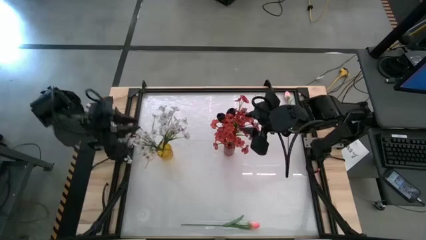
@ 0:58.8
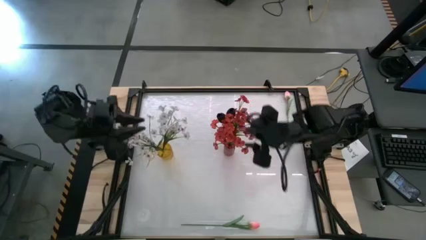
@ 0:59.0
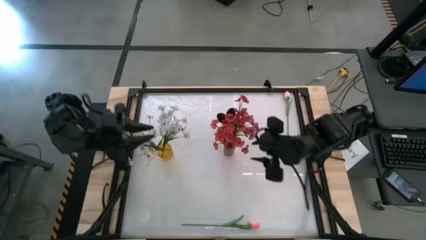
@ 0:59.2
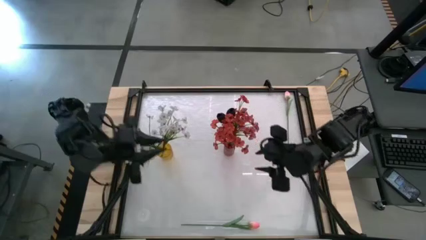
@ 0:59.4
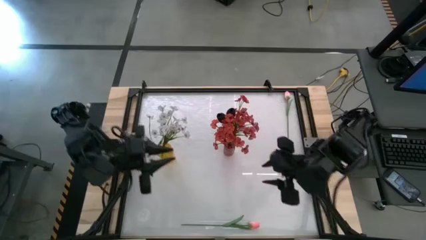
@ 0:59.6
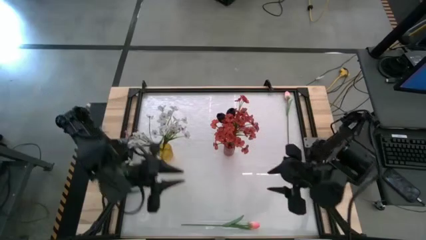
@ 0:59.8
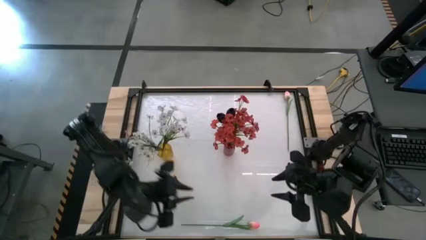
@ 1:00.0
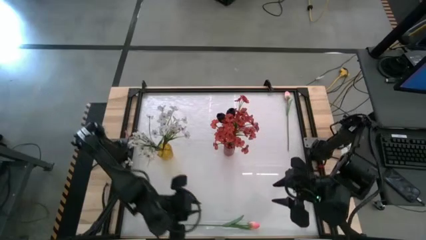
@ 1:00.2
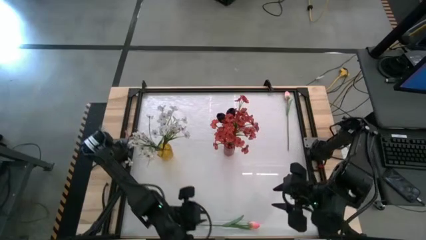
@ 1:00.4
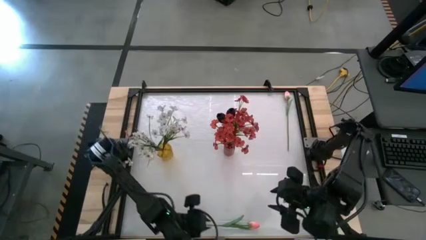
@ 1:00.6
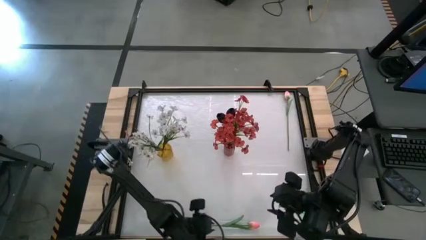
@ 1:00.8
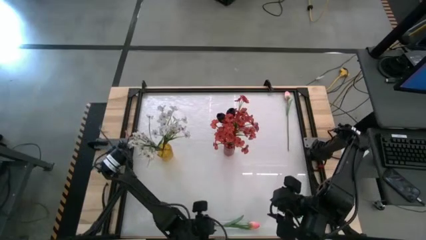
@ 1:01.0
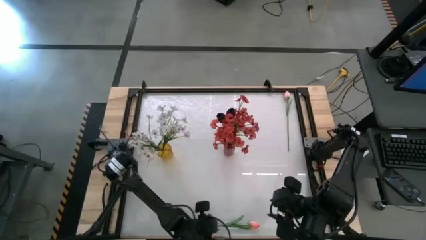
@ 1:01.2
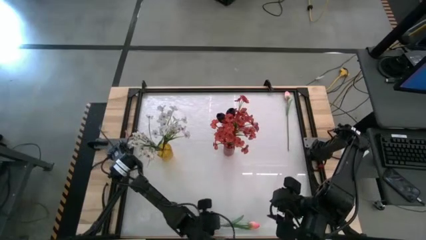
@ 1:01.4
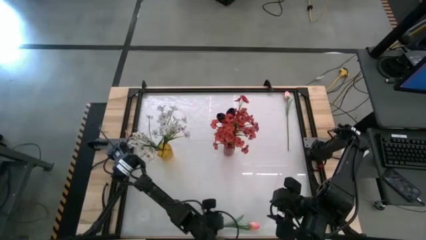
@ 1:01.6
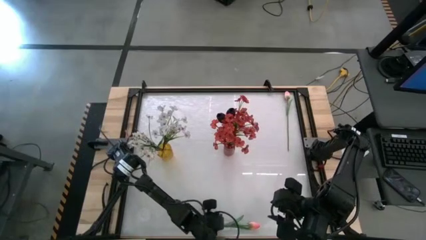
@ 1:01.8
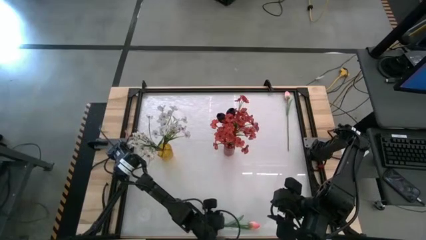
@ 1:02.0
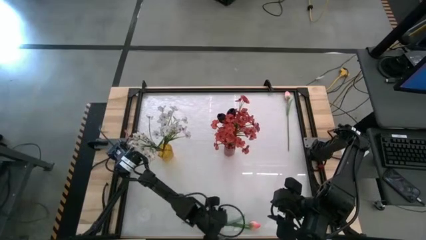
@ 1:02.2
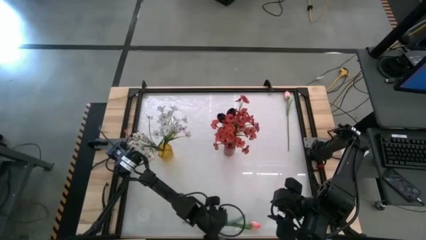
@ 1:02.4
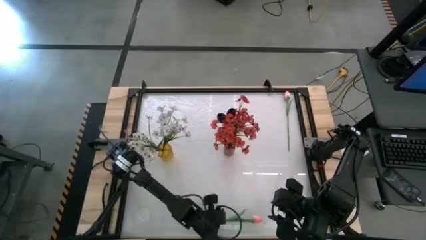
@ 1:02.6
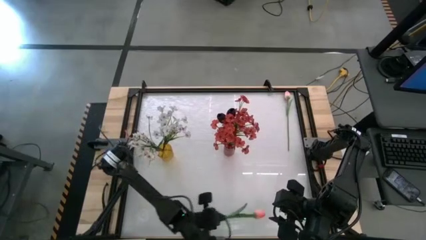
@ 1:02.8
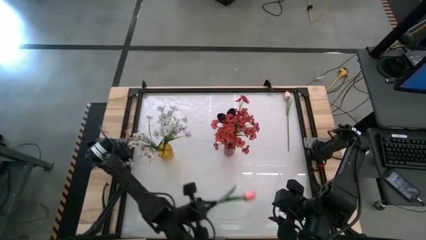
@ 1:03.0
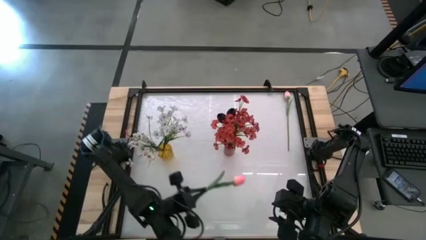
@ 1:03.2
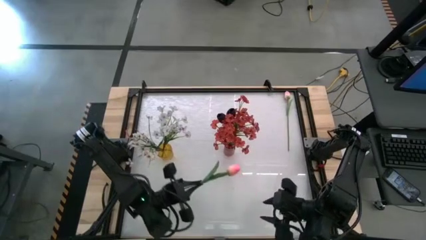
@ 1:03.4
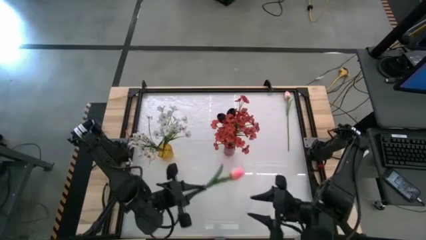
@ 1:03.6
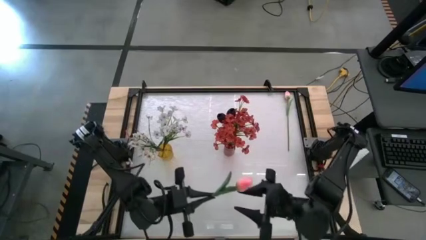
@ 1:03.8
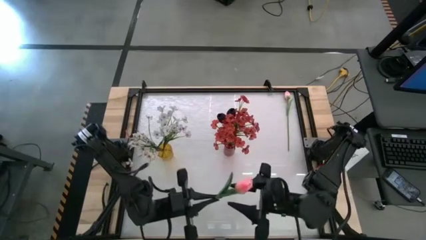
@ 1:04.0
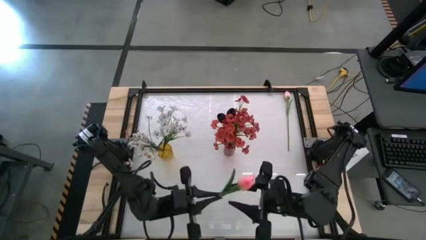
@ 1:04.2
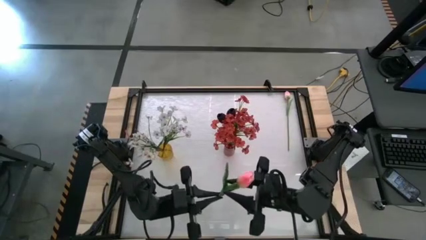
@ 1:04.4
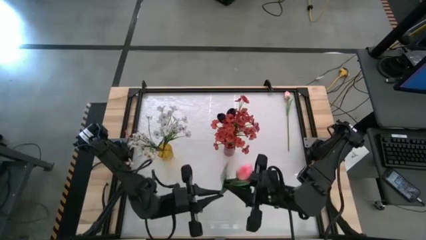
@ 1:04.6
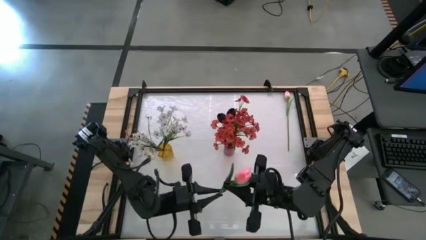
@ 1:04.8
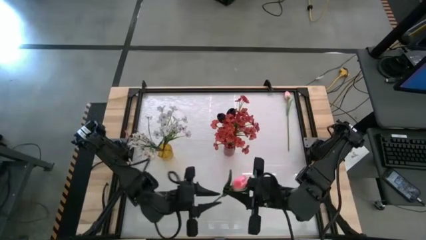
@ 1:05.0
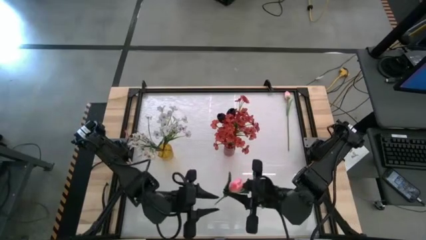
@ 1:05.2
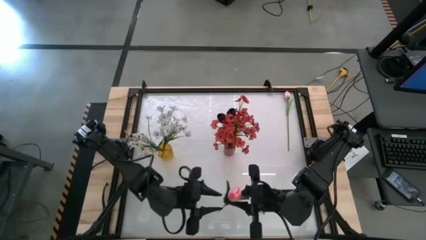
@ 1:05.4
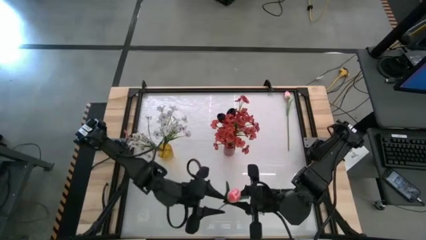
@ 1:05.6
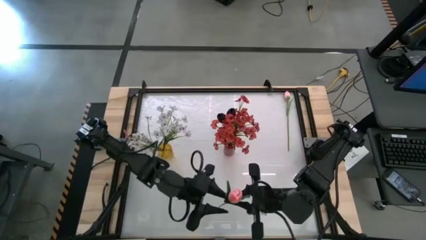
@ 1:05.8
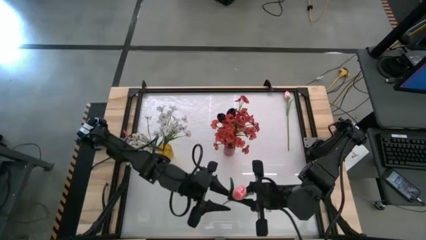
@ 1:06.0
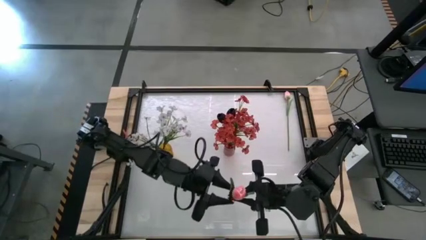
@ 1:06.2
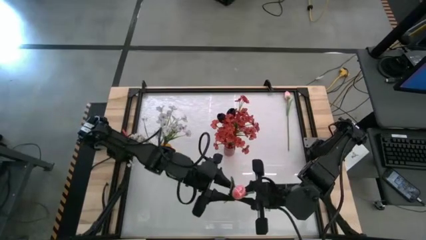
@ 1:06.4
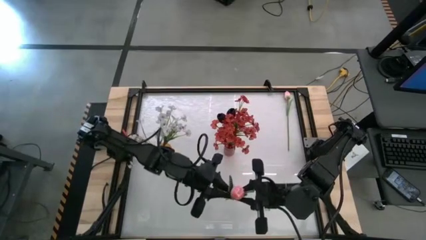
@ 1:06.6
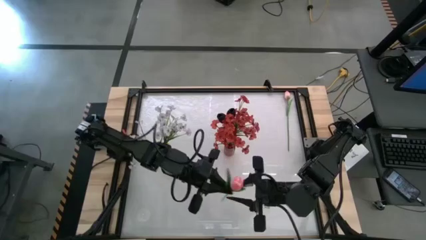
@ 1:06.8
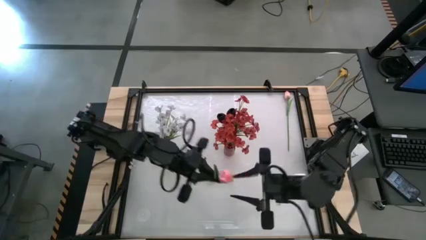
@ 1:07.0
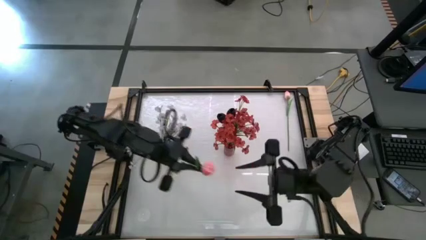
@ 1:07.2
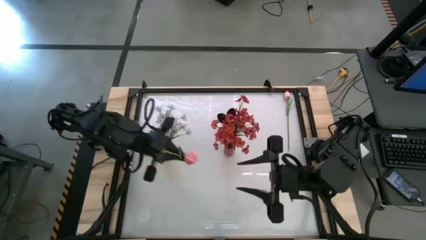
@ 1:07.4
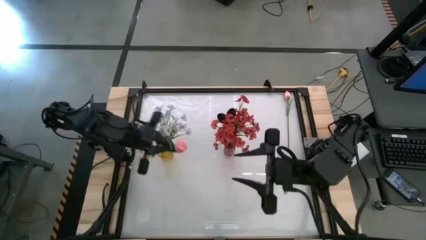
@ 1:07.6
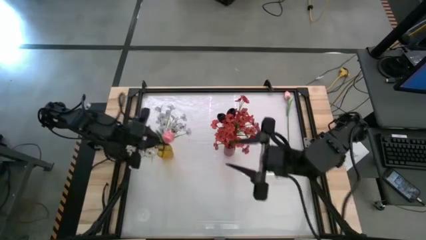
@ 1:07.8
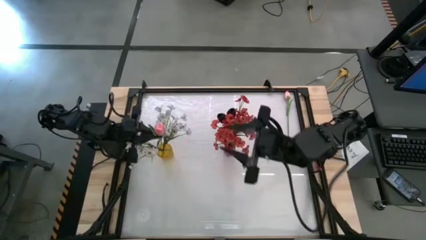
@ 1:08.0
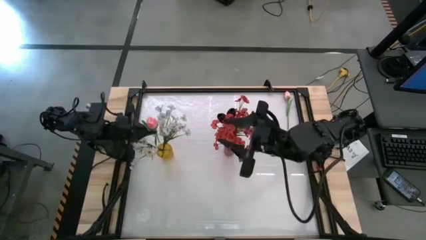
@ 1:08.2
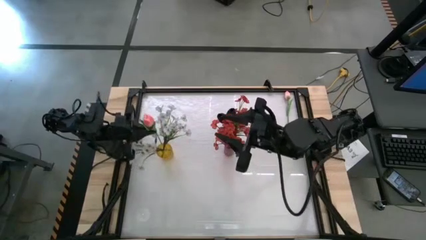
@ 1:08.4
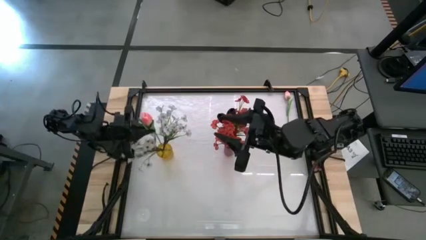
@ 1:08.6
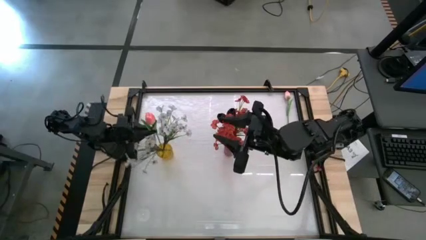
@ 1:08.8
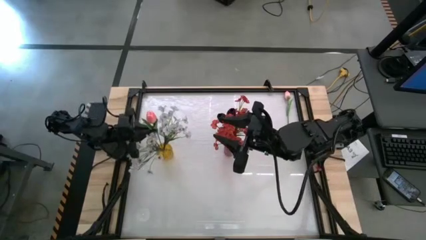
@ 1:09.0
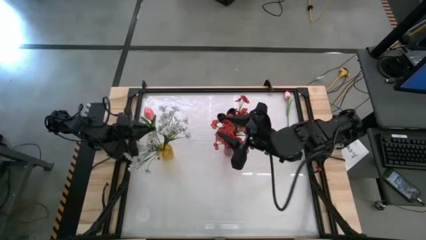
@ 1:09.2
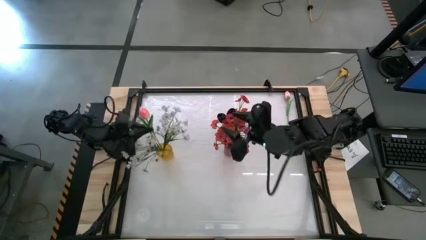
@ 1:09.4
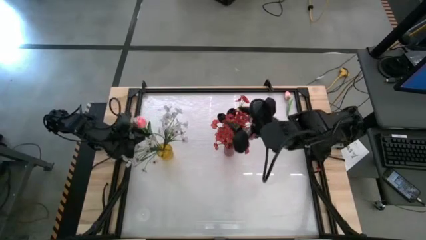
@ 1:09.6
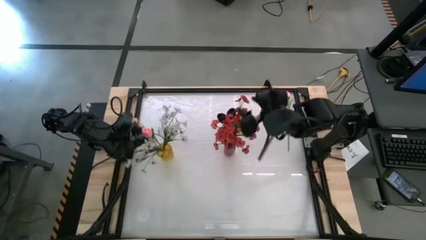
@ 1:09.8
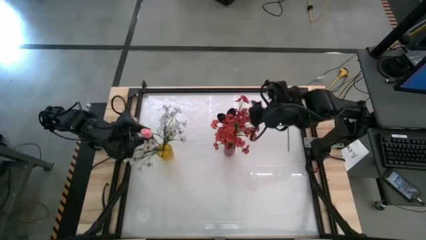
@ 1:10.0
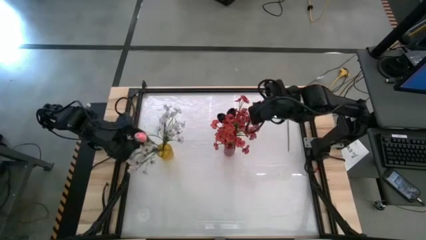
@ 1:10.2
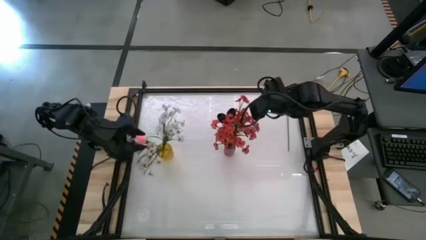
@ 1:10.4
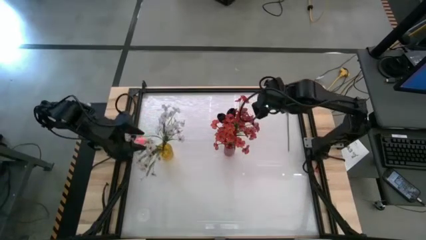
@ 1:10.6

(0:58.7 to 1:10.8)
Task: Sort flowers into vase by color
Put the bottom pink flower into the yellow vase

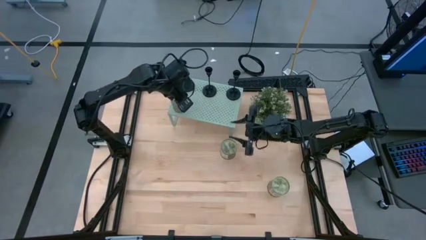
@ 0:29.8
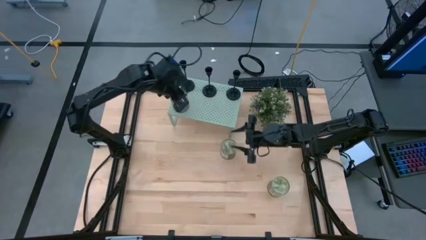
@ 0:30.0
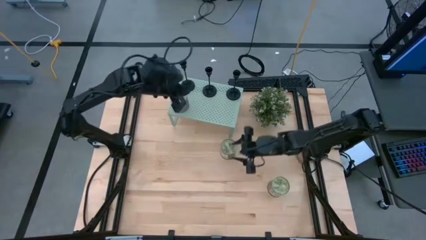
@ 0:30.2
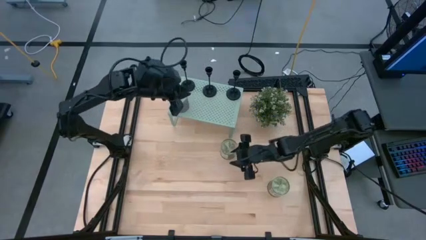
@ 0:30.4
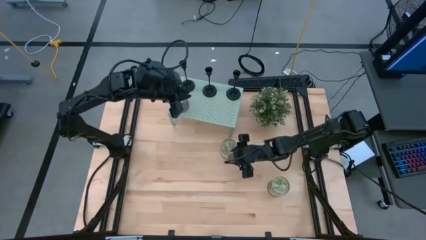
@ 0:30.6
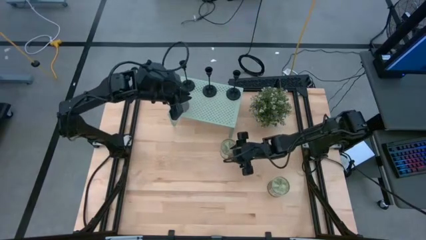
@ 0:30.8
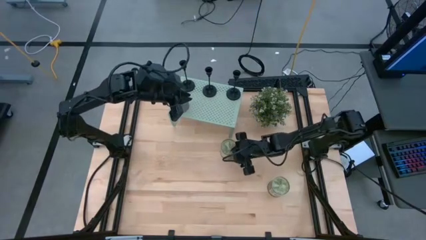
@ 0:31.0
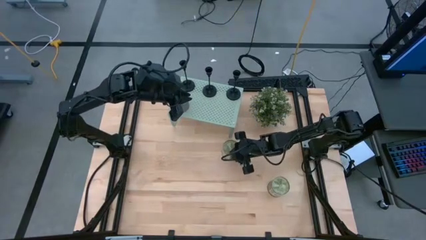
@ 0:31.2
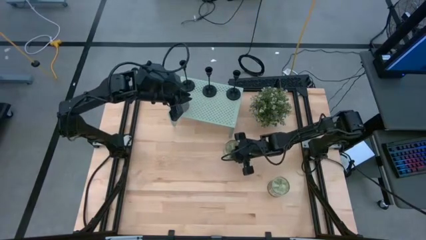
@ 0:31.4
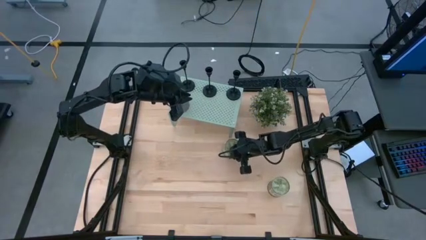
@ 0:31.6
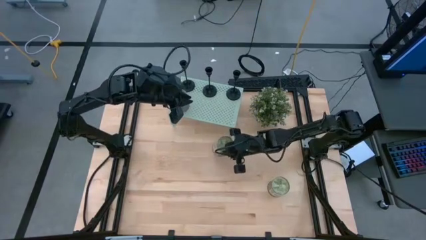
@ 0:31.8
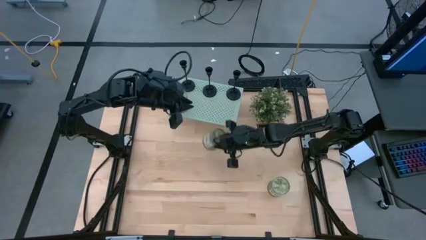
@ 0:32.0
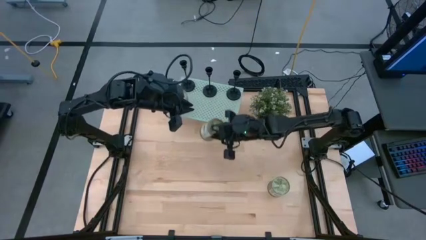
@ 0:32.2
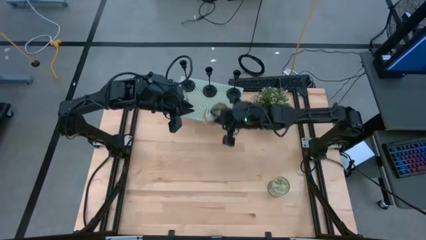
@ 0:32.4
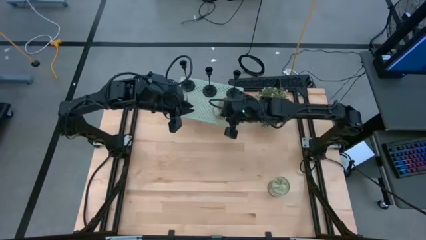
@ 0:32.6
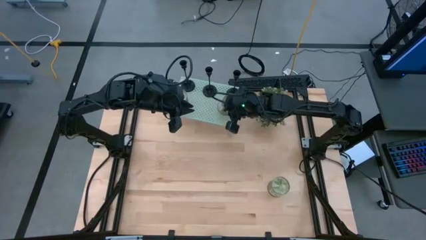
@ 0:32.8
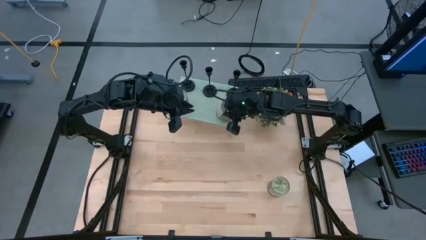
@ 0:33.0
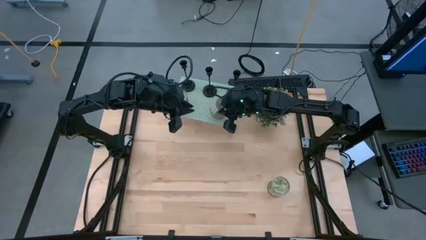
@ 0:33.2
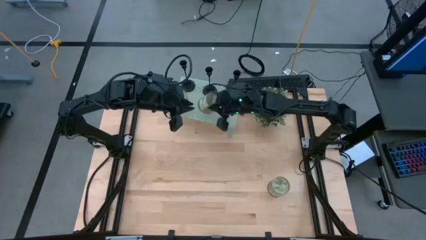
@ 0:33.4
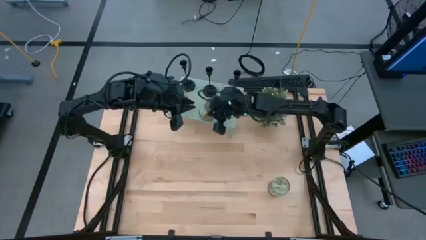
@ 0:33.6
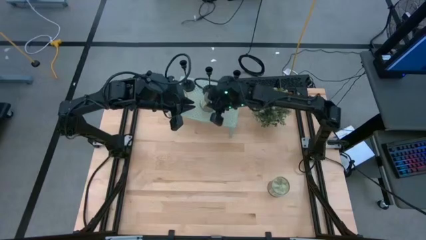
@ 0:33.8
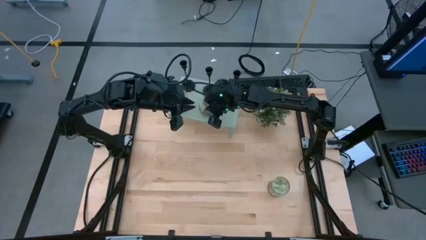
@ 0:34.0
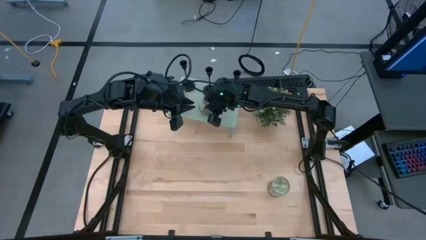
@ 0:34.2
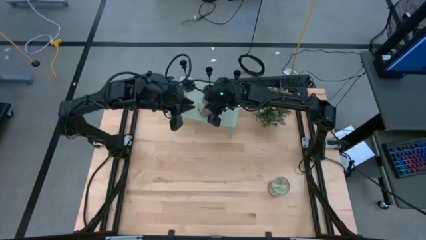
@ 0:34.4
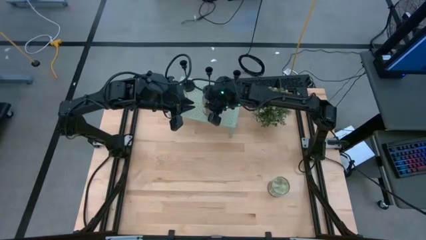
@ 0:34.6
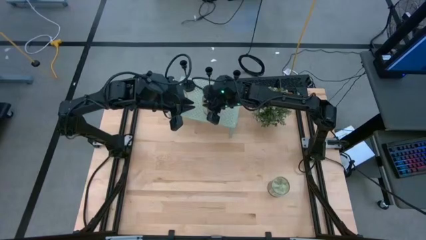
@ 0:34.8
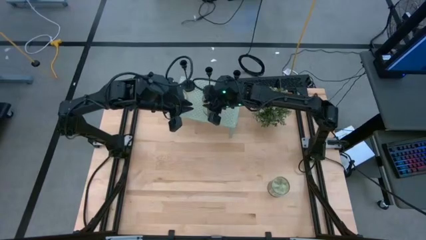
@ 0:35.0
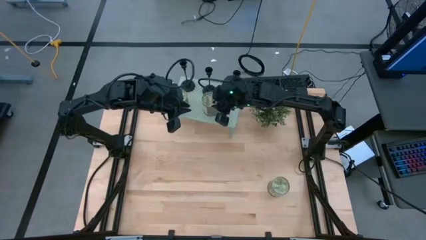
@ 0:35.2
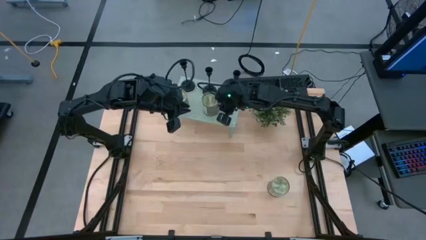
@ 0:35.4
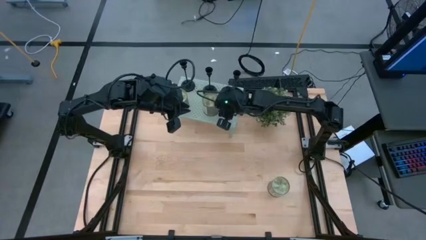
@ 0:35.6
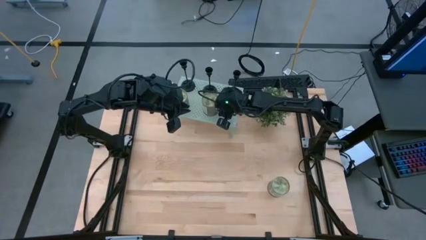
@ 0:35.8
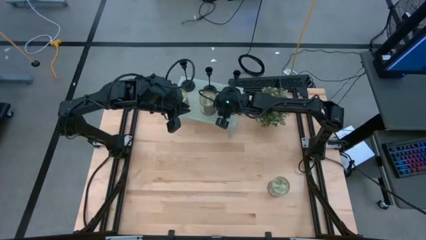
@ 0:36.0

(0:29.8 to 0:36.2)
Task: Pick & Place candle stick holders
Put the top yellow scented candle on the shelf
